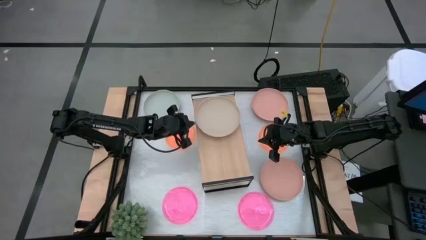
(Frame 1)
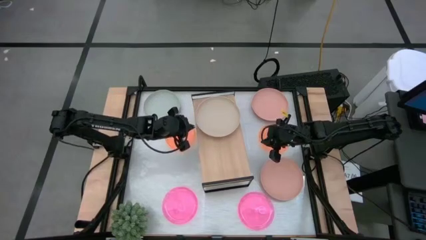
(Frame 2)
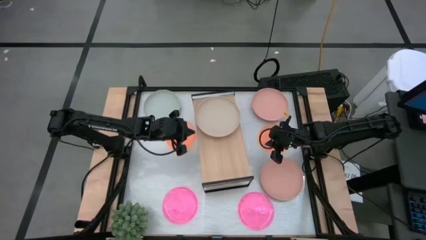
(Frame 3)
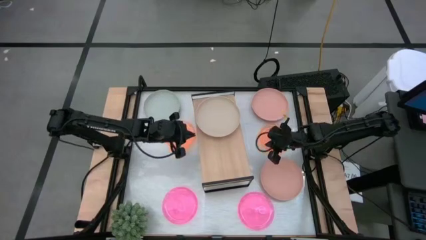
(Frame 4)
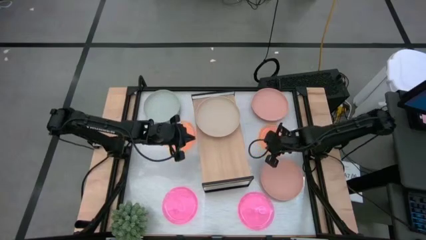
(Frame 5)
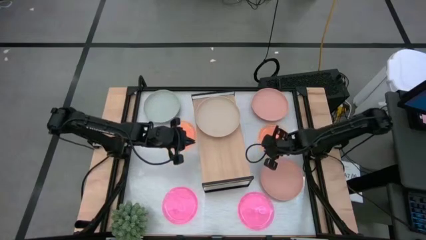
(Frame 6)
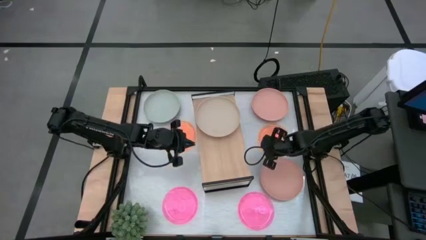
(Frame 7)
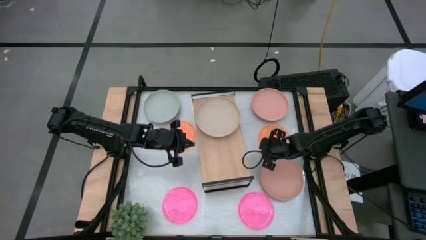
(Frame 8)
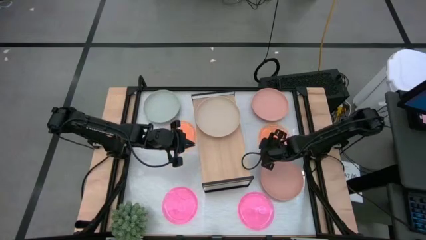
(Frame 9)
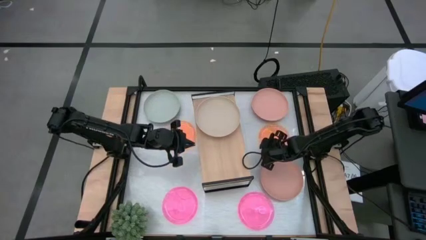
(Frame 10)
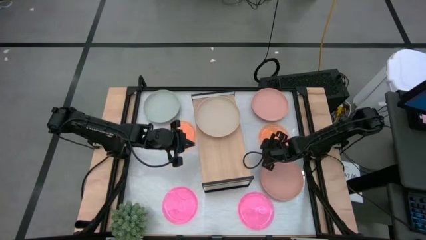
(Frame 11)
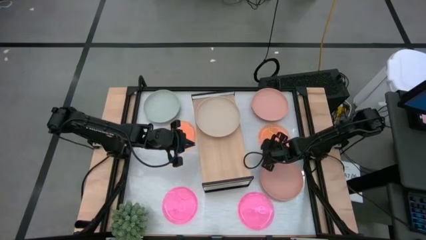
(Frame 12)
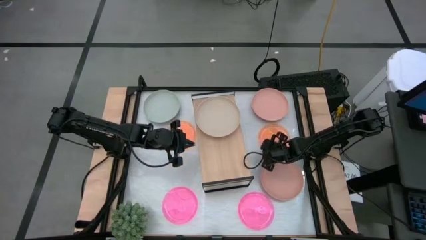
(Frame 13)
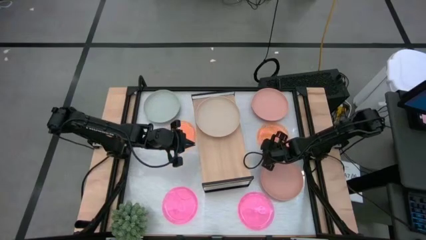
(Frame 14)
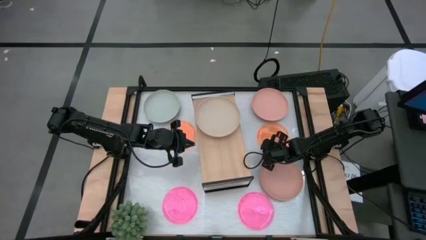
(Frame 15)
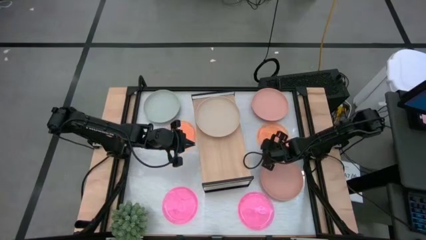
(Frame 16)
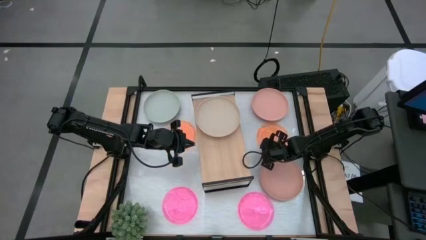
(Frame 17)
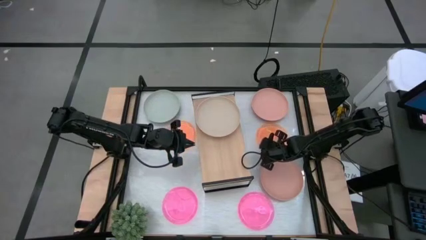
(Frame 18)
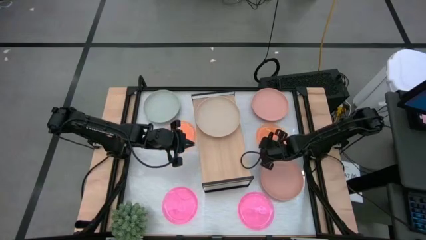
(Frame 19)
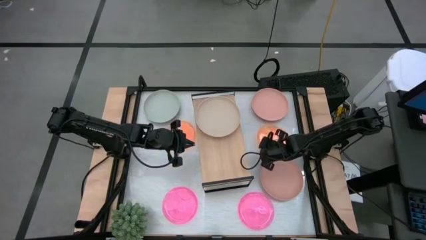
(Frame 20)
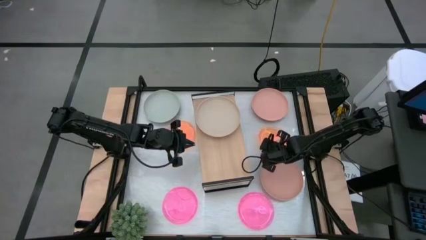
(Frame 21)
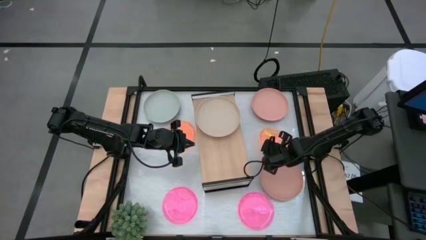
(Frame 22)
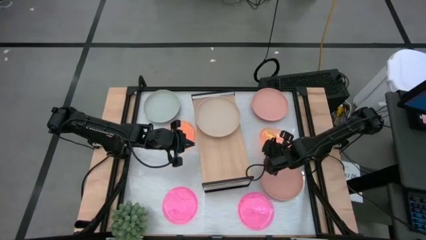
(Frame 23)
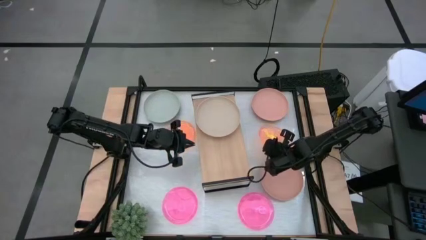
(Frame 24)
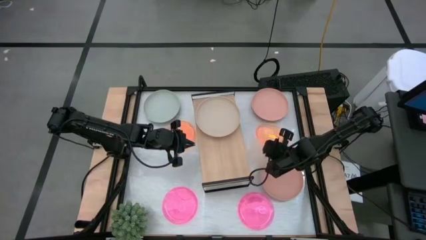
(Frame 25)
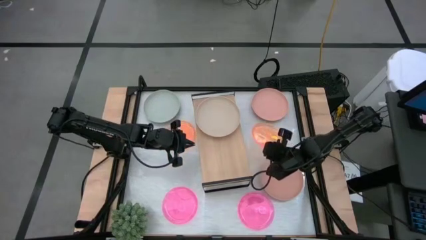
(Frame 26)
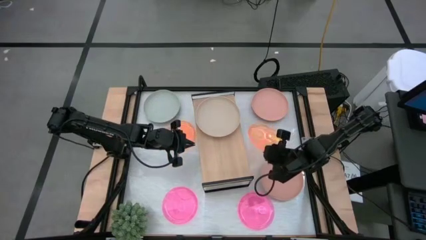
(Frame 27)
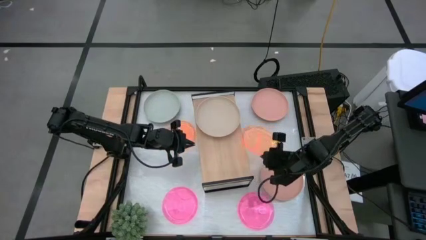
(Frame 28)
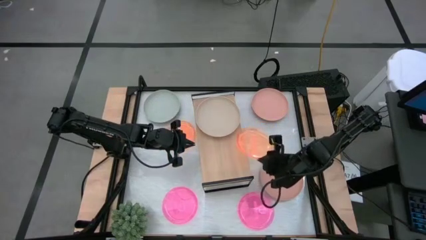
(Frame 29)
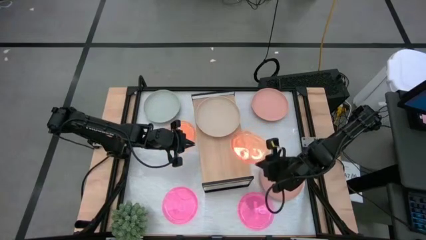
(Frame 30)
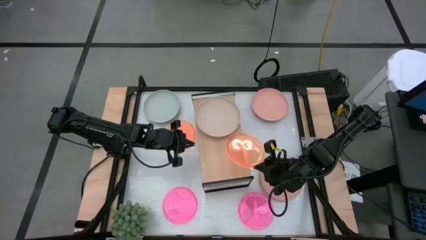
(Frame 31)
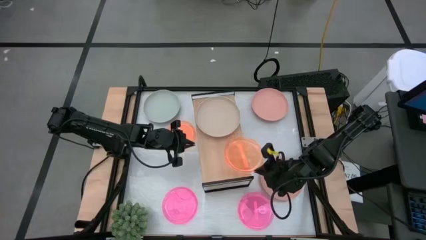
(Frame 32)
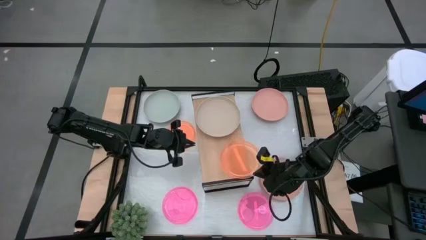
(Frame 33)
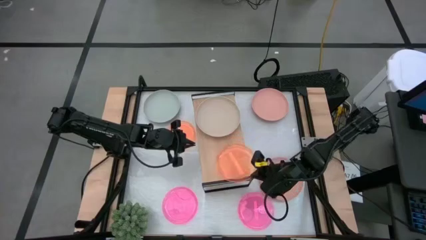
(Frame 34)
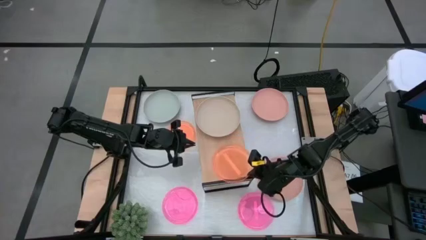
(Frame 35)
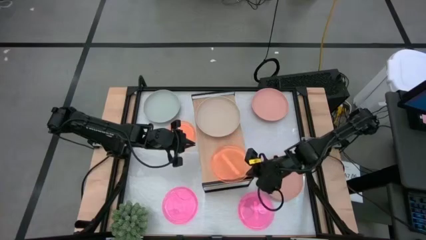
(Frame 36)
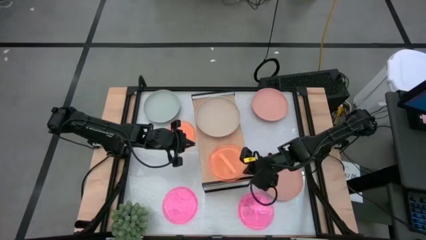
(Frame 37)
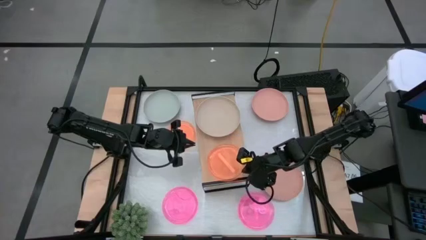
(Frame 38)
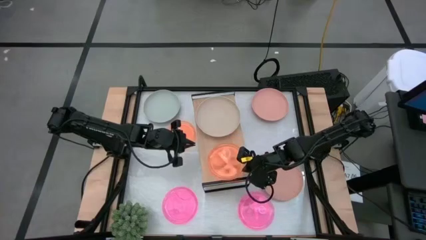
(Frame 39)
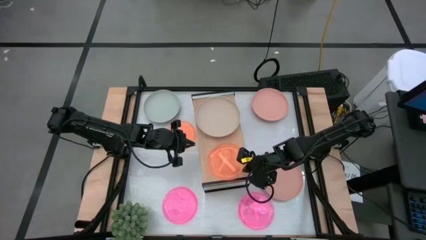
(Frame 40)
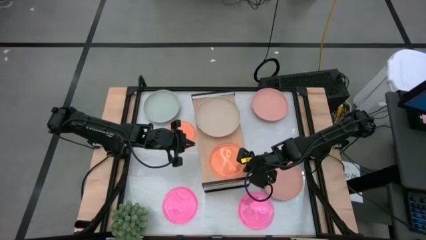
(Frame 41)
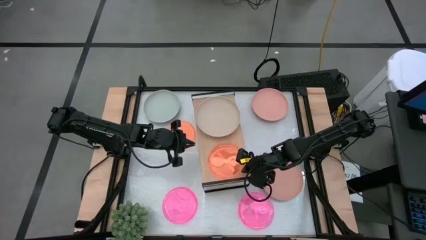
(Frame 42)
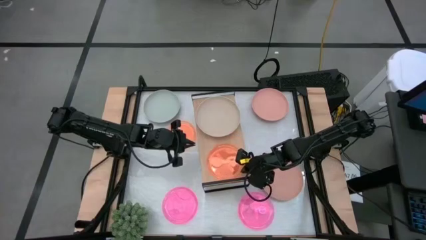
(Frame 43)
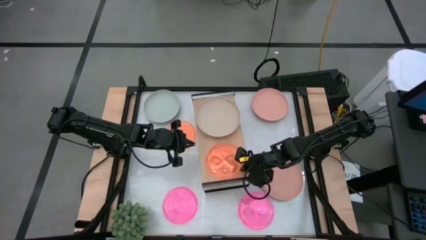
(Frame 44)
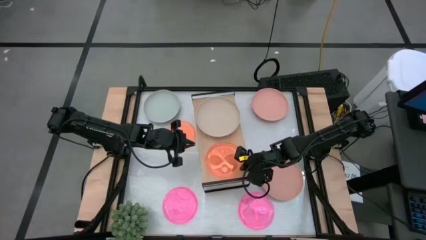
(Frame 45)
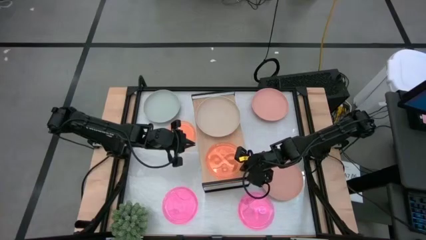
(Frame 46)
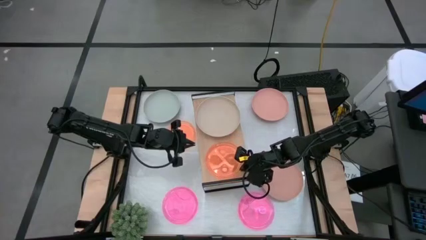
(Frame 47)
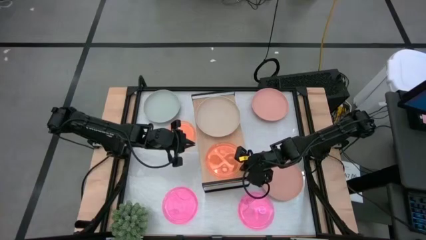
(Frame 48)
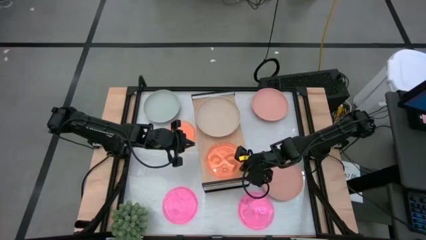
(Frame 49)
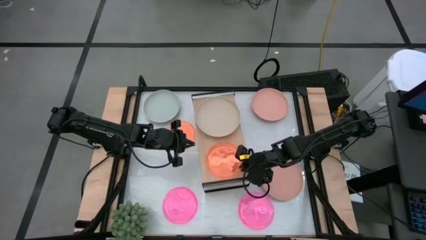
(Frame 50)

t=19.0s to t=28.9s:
Task: Place and stack plates onto a shelf
Put the right orange plate on the shelf
